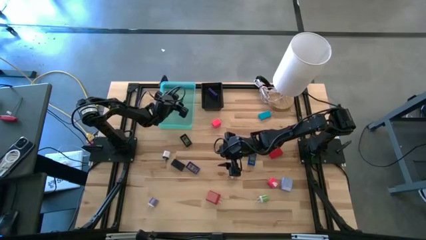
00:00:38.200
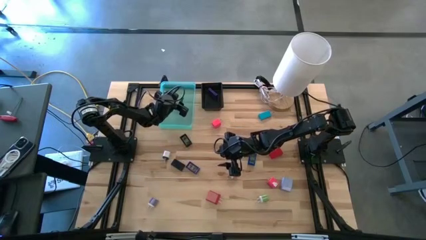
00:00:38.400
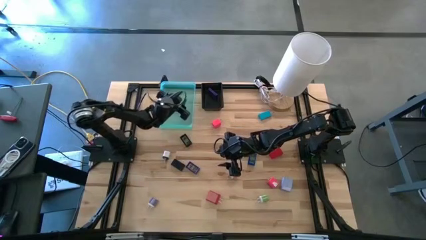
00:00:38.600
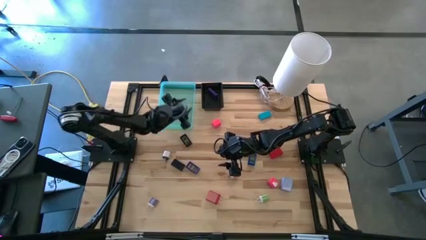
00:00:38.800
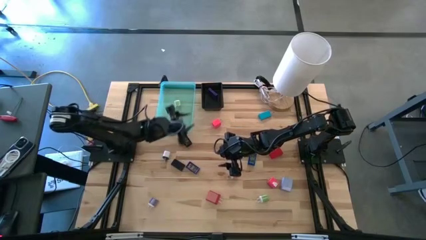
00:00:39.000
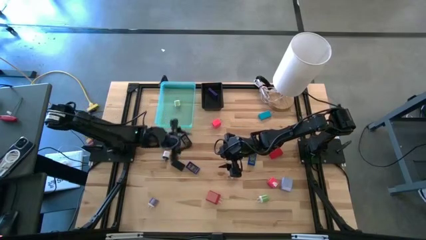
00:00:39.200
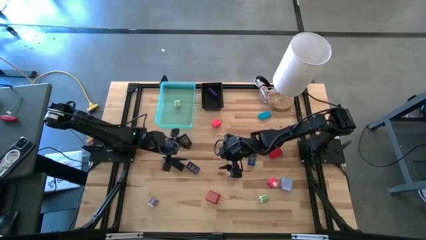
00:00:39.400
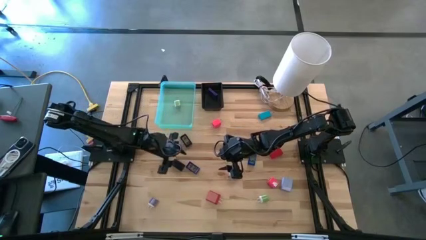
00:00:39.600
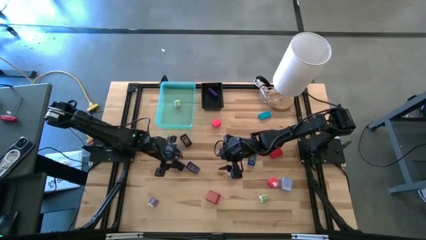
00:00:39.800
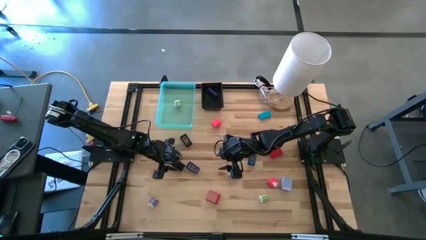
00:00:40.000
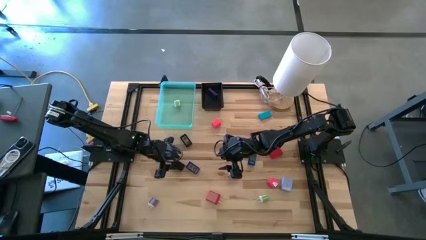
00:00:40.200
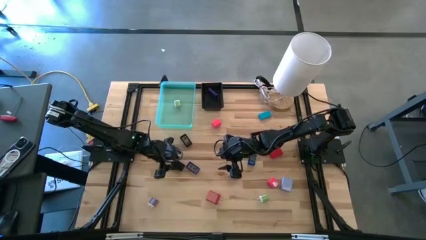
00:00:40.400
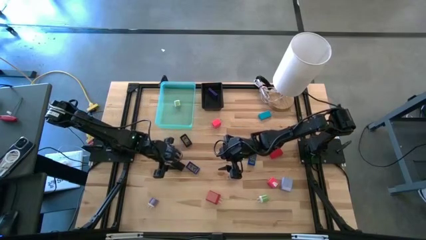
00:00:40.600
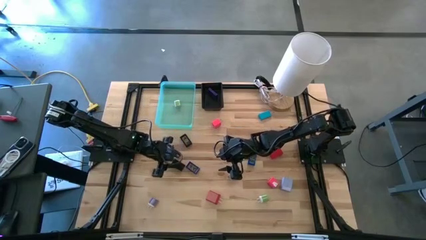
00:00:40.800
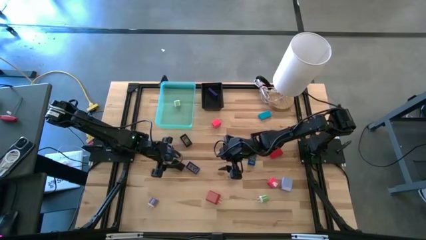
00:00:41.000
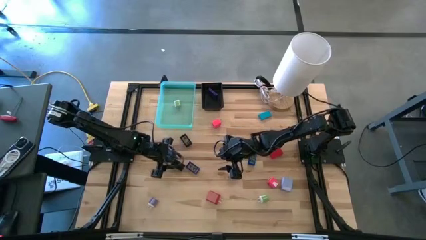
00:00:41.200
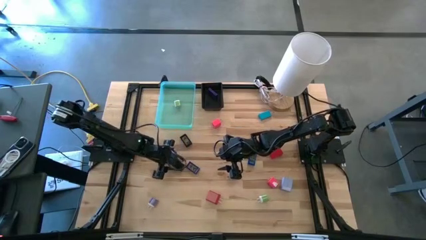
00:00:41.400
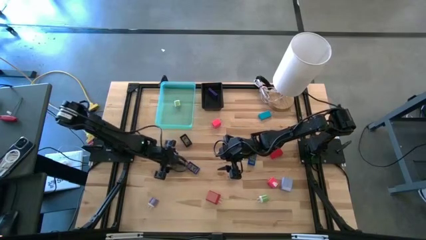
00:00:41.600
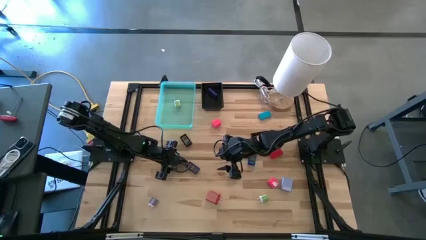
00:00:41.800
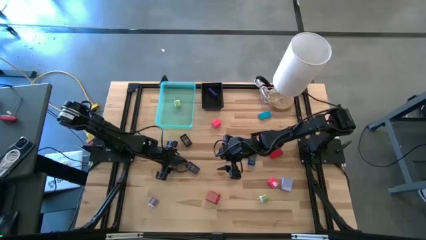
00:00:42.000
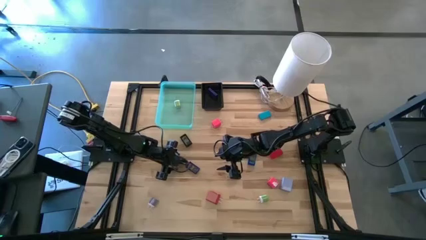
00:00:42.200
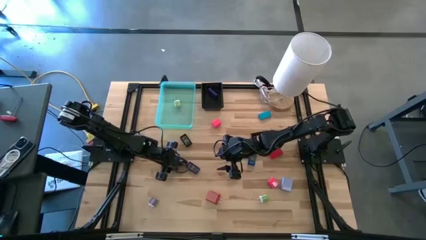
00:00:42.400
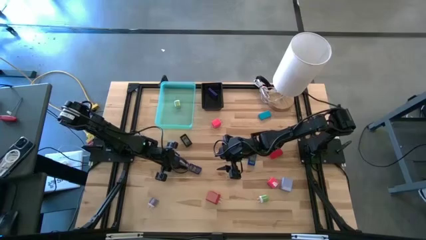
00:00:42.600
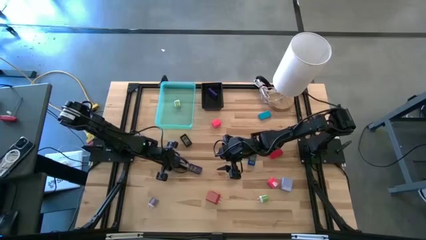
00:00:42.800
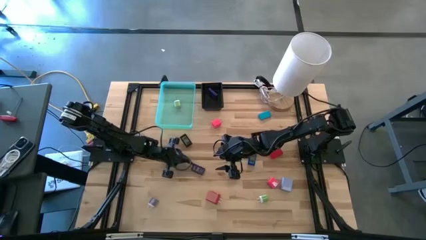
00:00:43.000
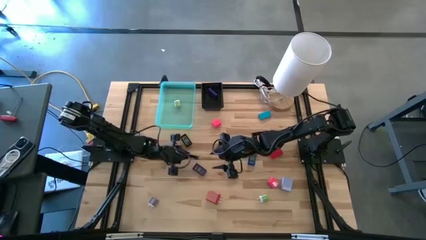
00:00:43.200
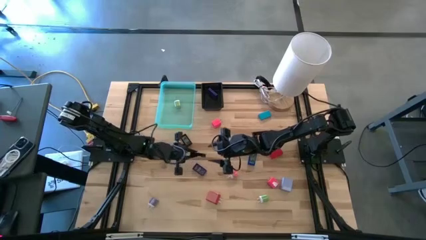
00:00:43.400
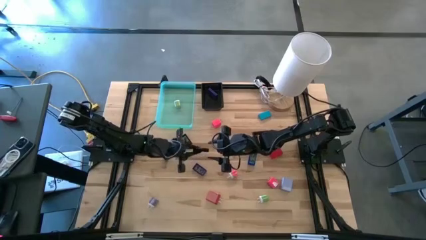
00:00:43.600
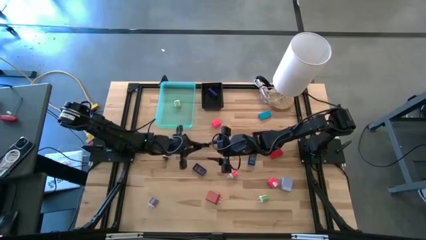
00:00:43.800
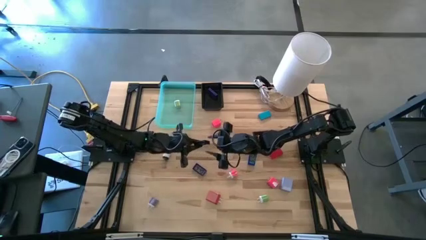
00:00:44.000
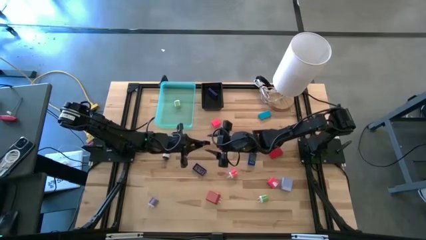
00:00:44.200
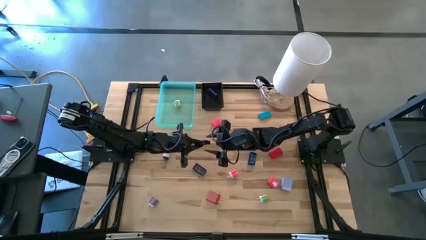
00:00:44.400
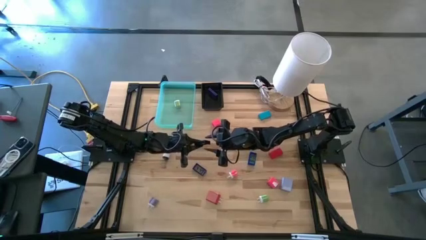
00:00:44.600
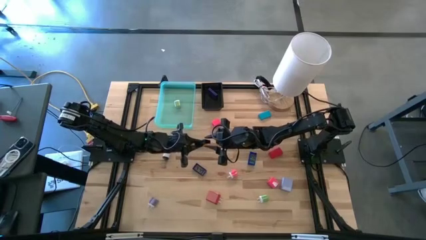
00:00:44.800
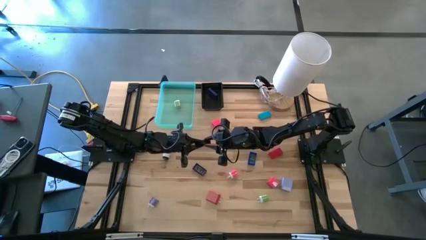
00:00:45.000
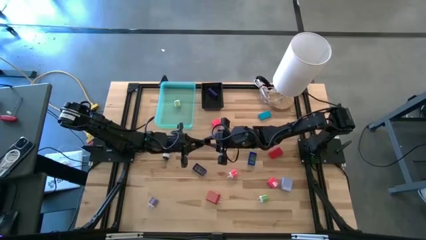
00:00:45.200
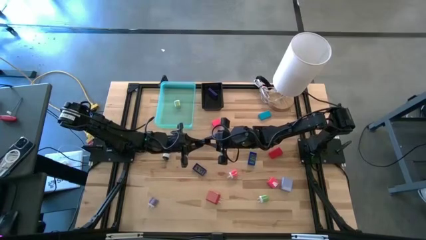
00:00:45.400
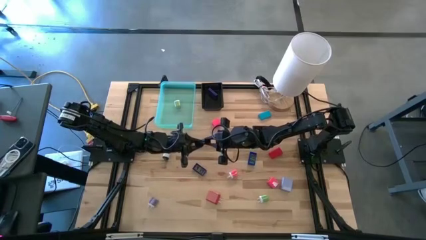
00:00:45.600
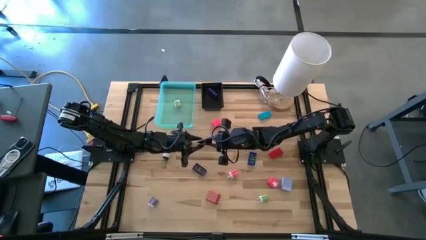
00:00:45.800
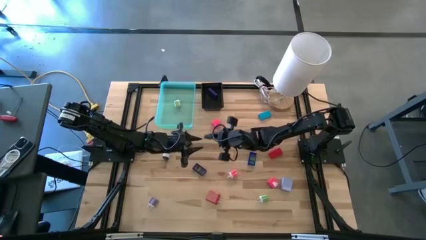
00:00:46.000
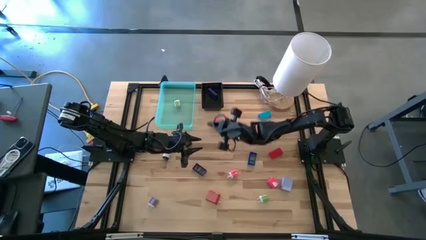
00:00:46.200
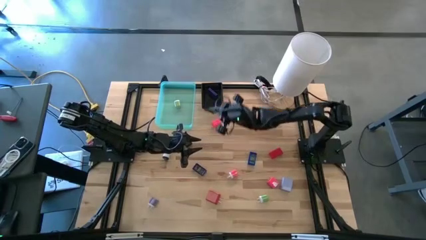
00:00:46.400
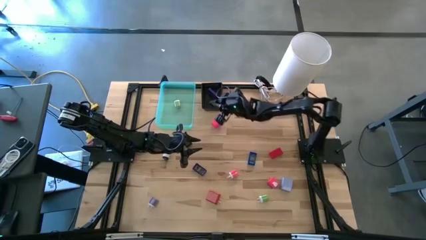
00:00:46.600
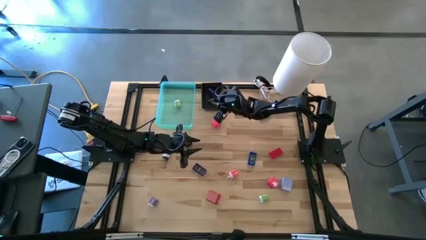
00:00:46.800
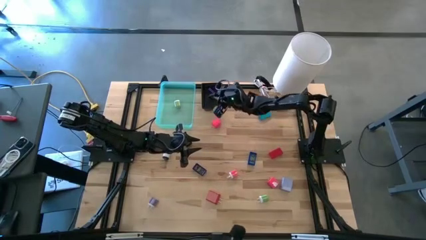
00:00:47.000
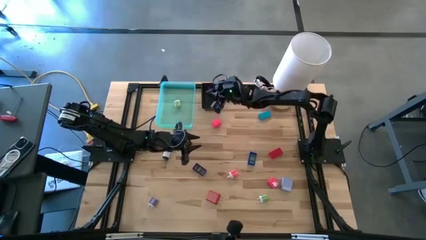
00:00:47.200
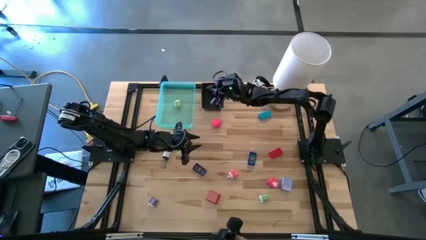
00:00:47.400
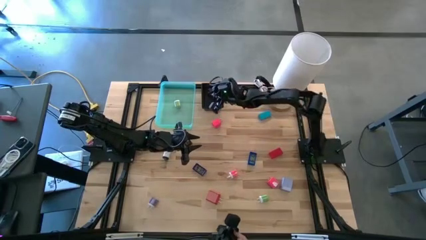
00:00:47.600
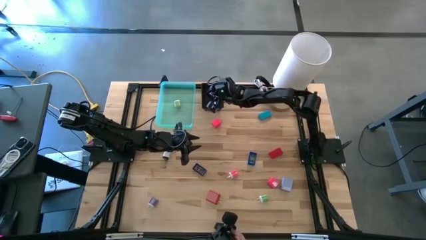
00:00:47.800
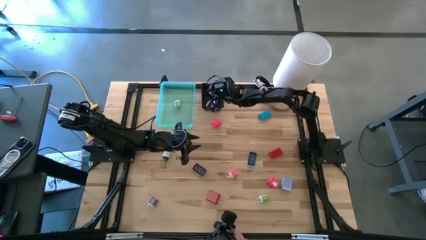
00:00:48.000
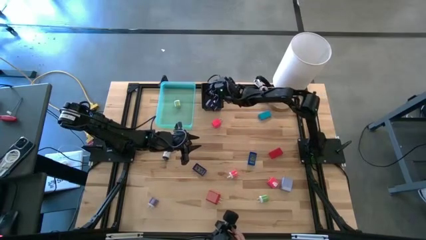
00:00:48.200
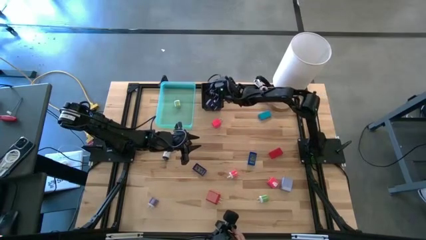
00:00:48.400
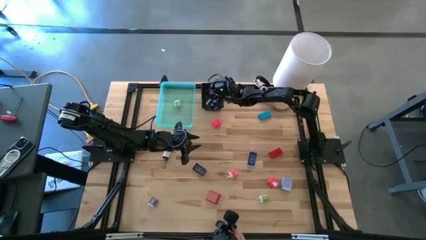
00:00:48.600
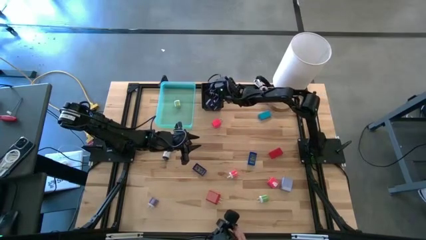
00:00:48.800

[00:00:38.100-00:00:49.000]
Task: Pick & Place Office items
Put the bottom black timer into the black bin
